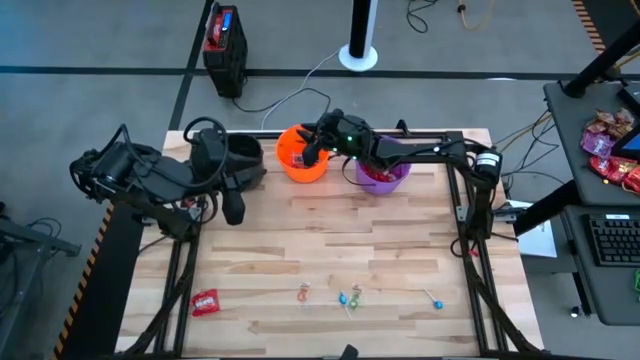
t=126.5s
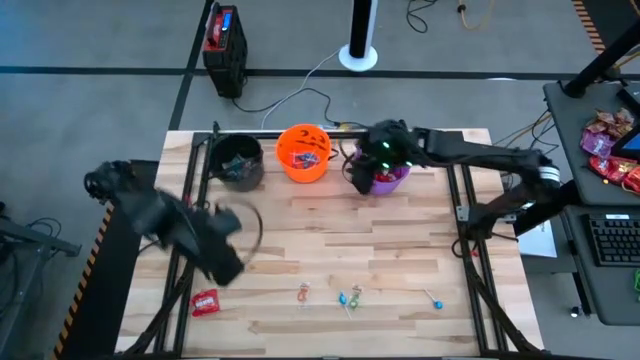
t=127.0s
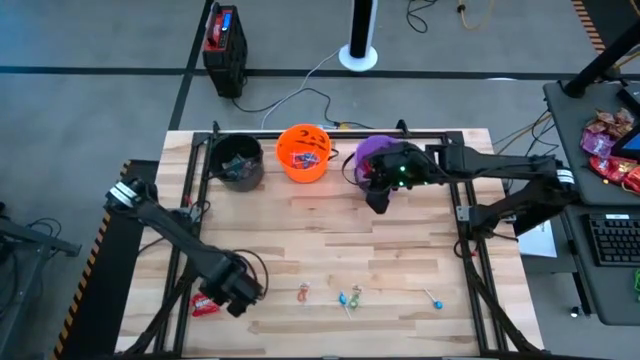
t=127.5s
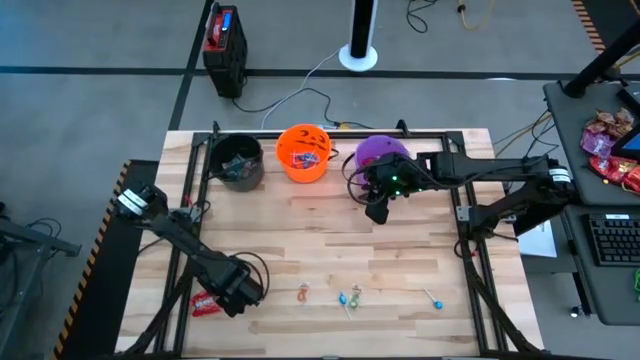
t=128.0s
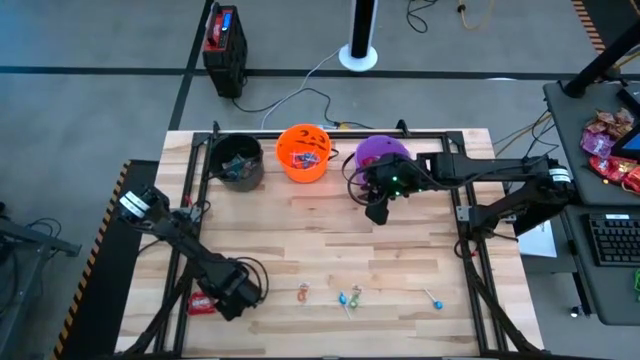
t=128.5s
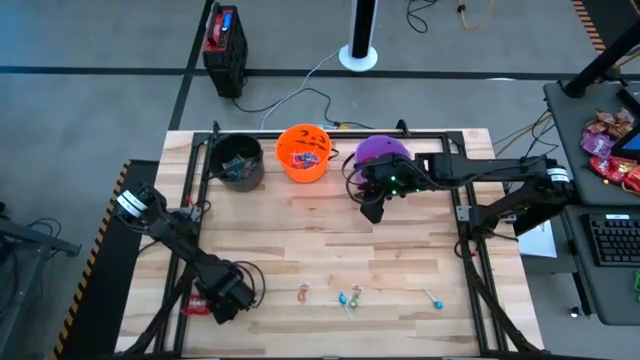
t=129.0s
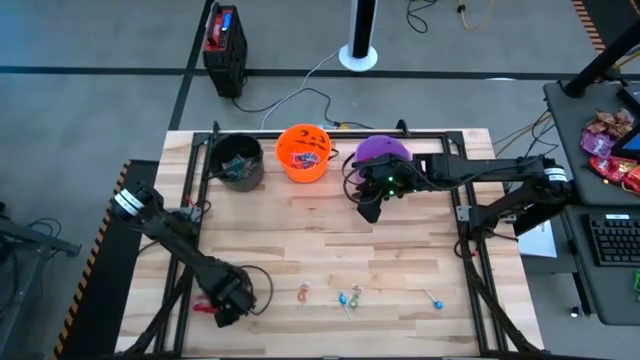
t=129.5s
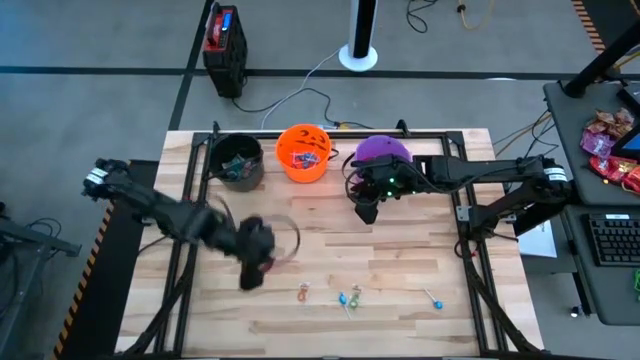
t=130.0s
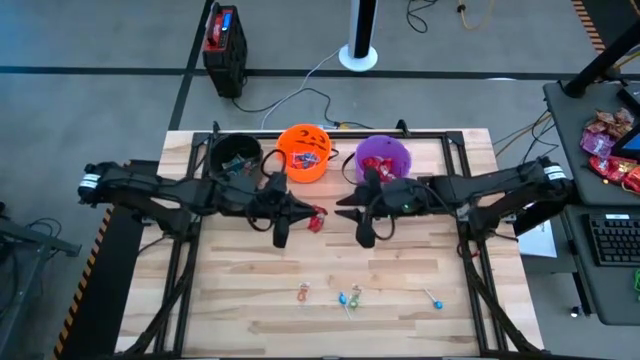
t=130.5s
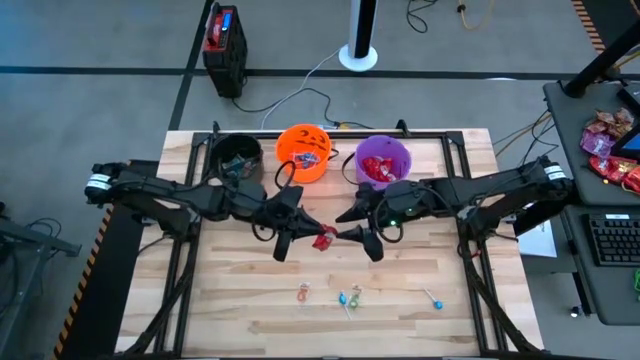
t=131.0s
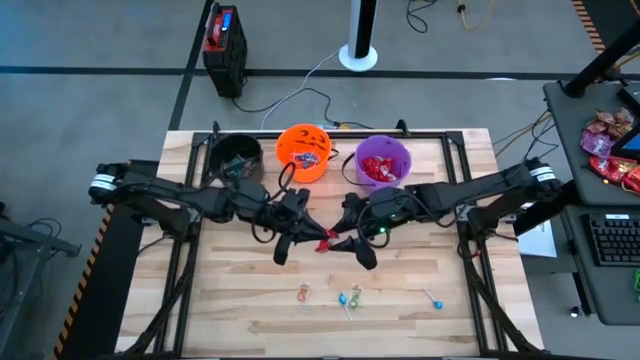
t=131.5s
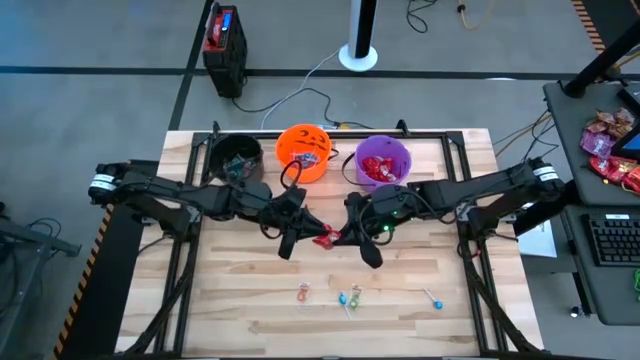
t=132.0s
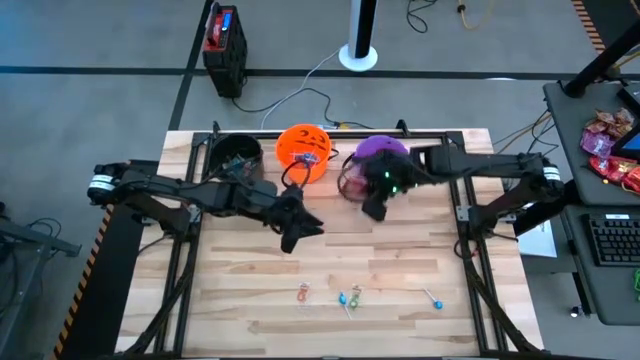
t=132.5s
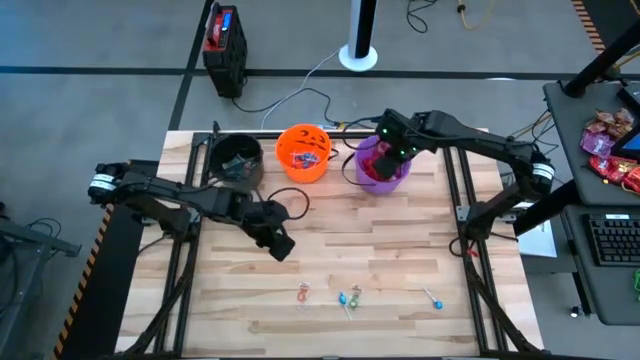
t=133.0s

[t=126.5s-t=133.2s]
Task: Sort candy by brand, put in halloween buckets
Put the red candy into the violet bucket

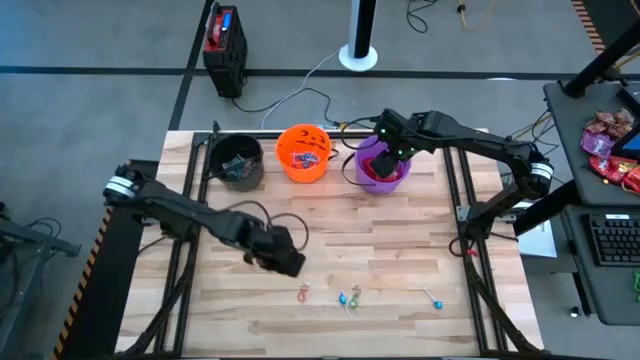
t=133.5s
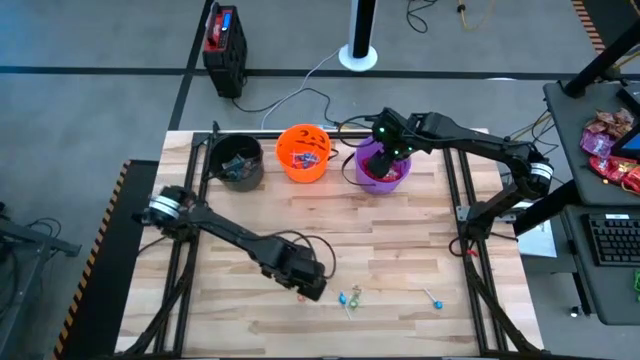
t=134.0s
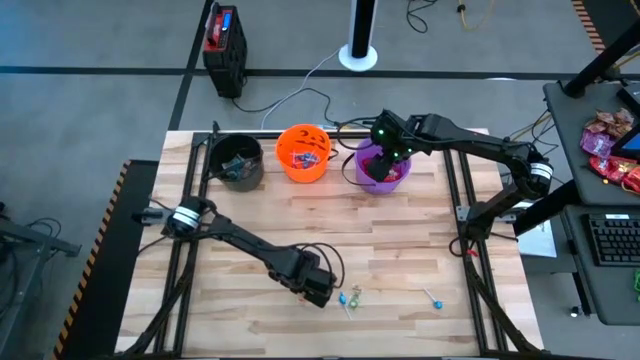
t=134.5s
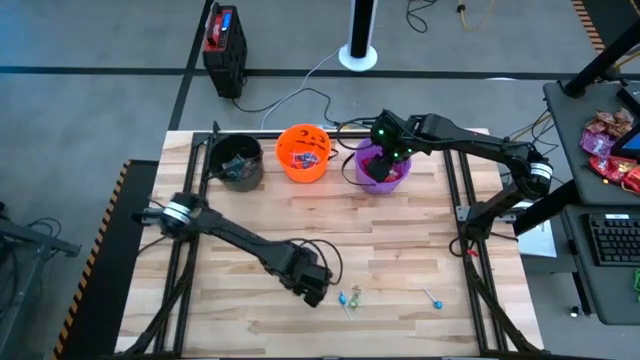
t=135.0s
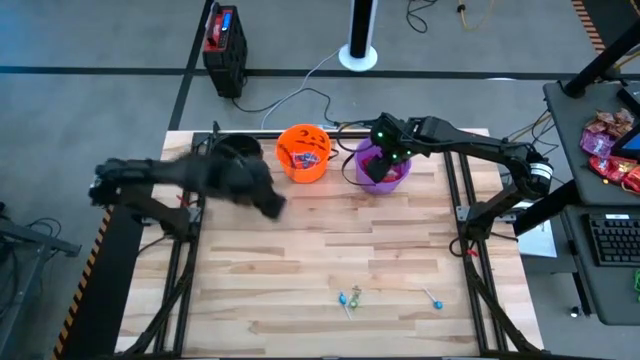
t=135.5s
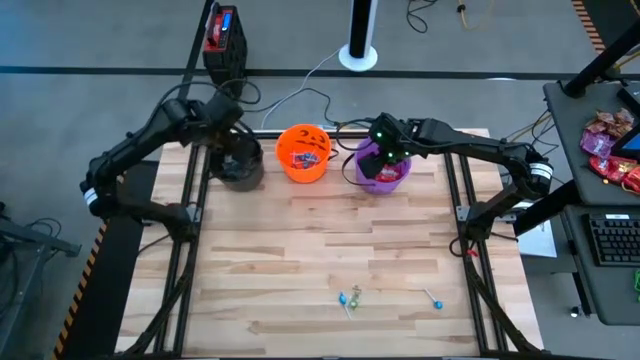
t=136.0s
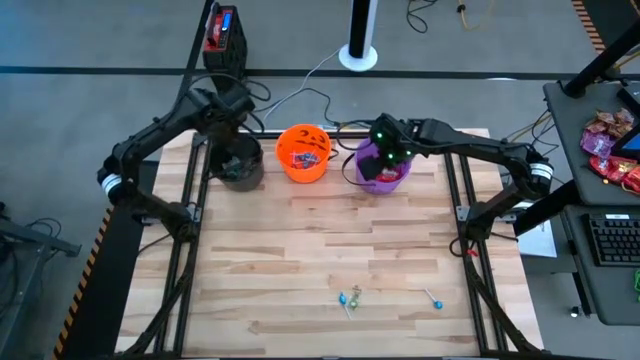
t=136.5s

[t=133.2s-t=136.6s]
Put the orange gummy into the black bucket

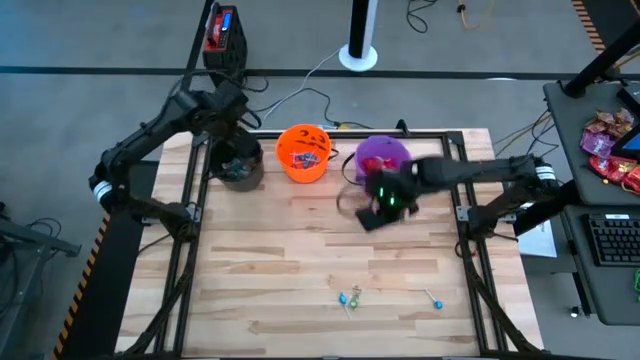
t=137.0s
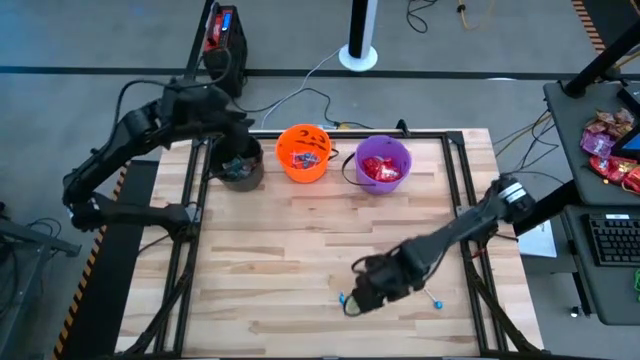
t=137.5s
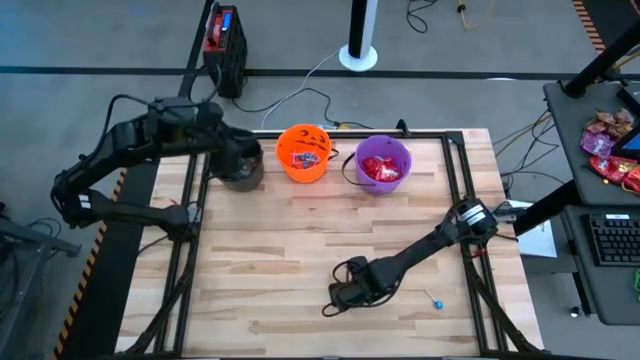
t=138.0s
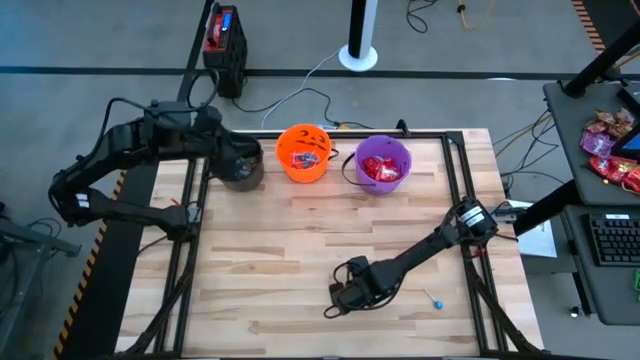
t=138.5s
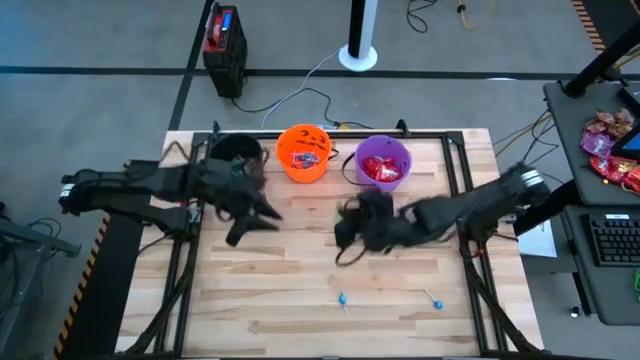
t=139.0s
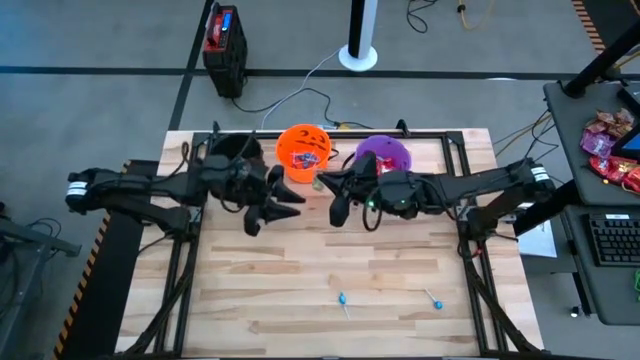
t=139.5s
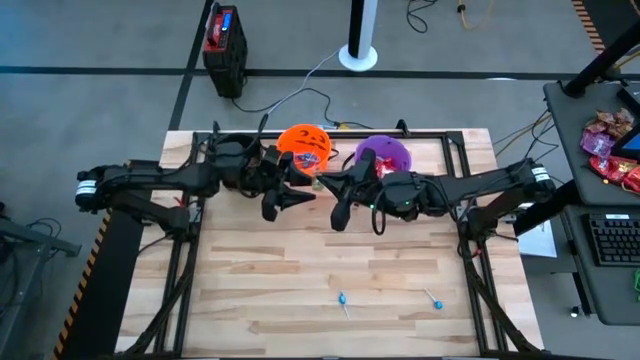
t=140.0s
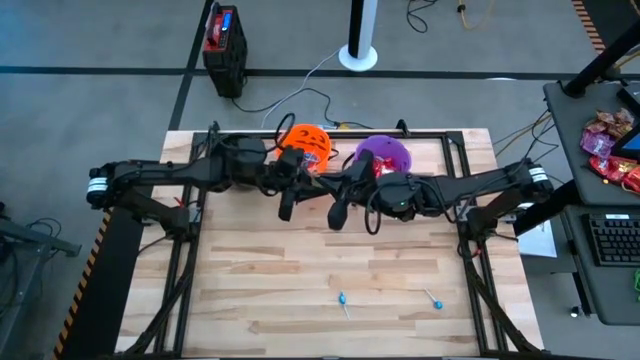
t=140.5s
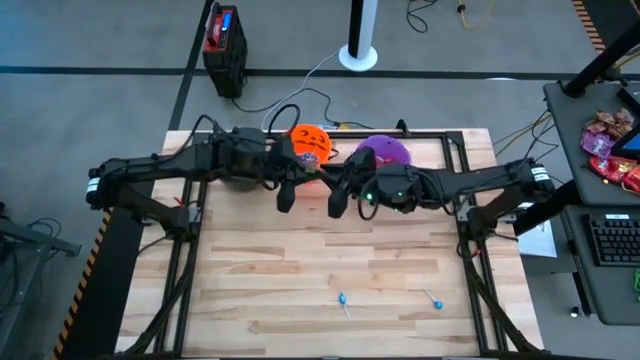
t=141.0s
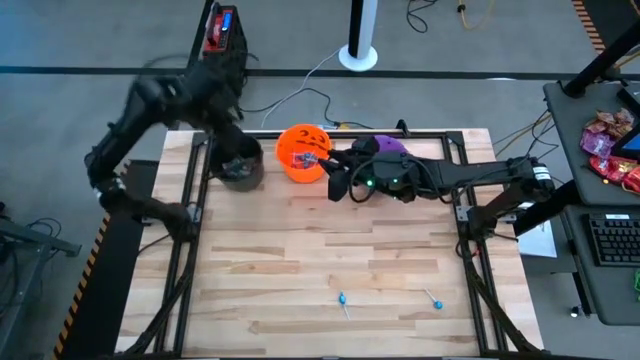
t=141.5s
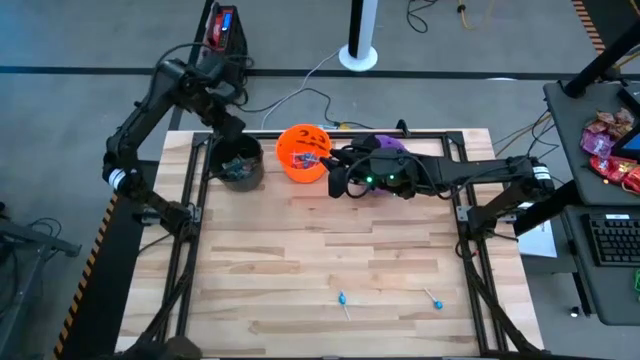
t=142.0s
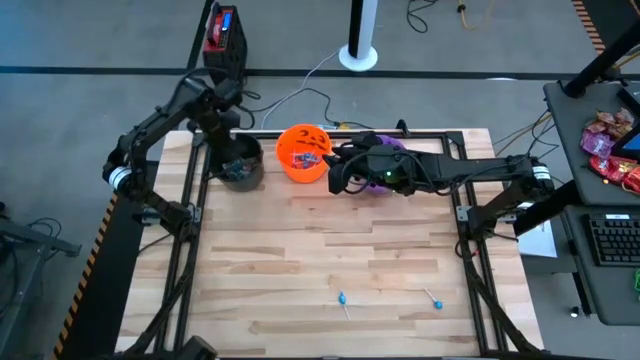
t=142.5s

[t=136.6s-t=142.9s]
Put the green gummy into the black bucket

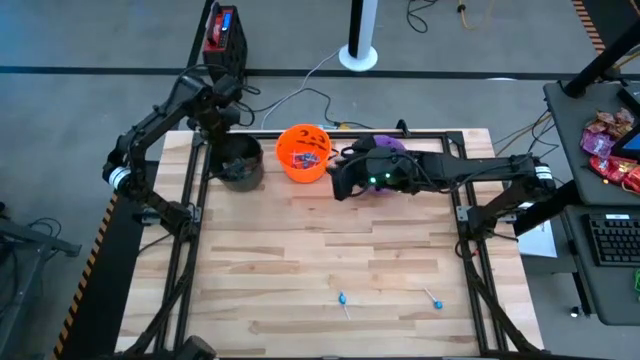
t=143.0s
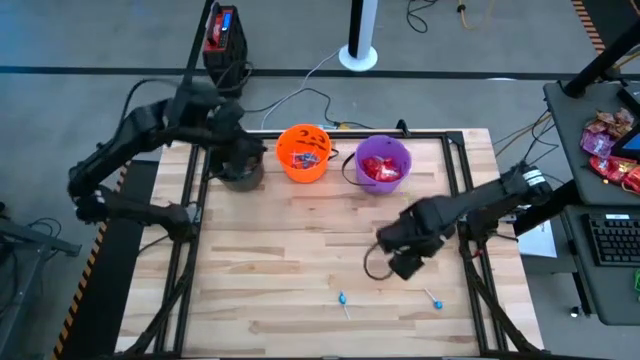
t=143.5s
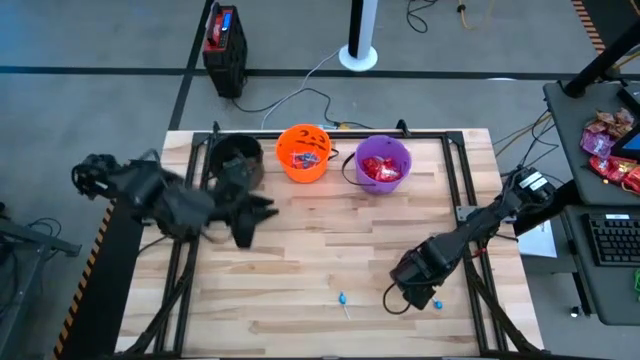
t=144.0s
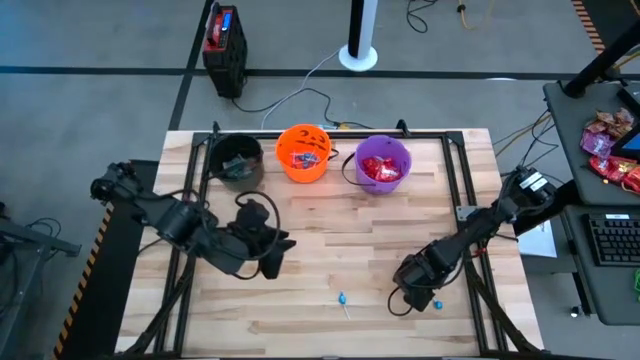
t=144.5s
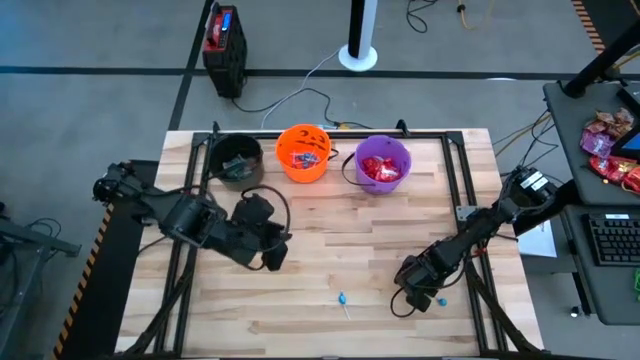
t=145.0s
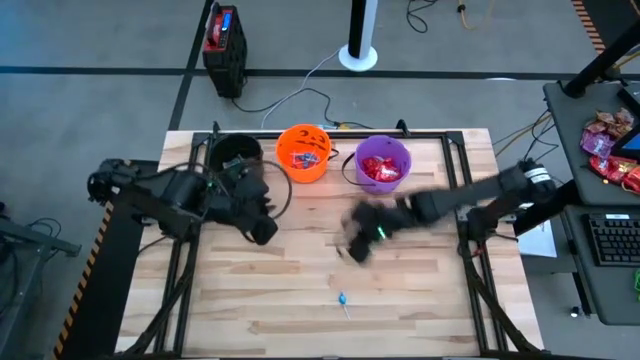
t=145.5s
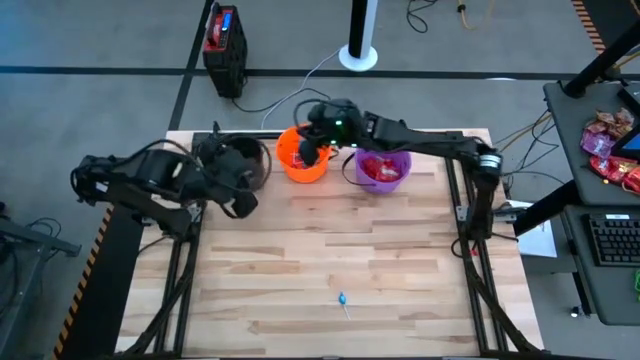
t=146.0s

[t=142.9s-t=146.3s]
Put the blue candy into the orange bucket

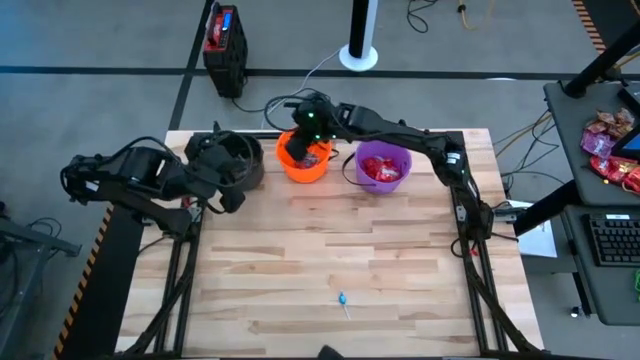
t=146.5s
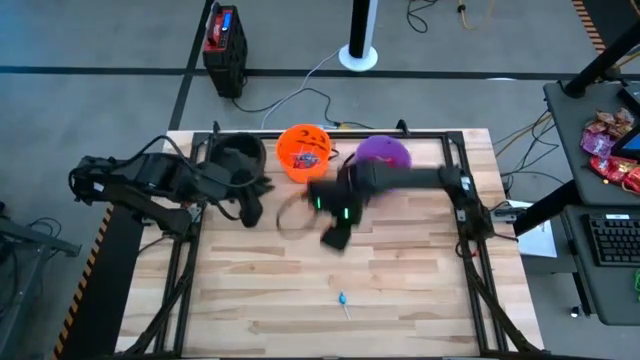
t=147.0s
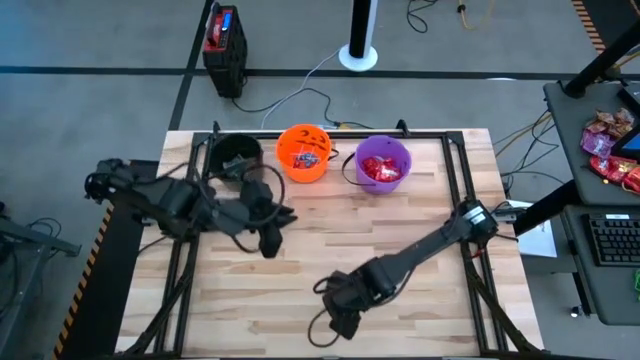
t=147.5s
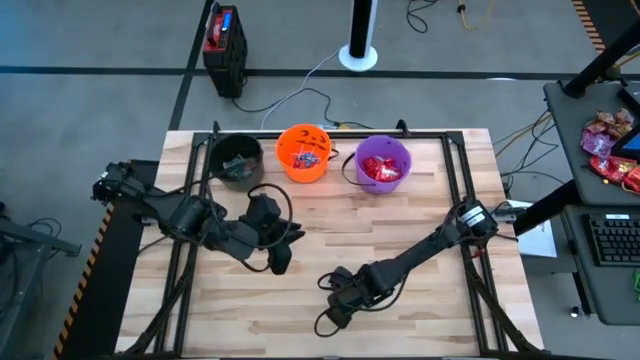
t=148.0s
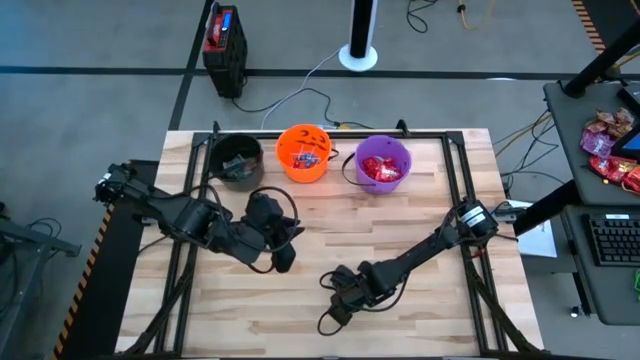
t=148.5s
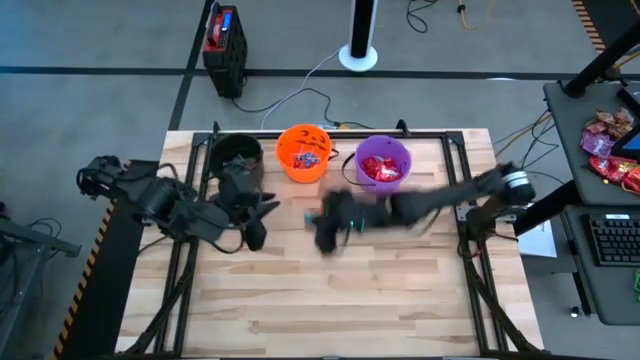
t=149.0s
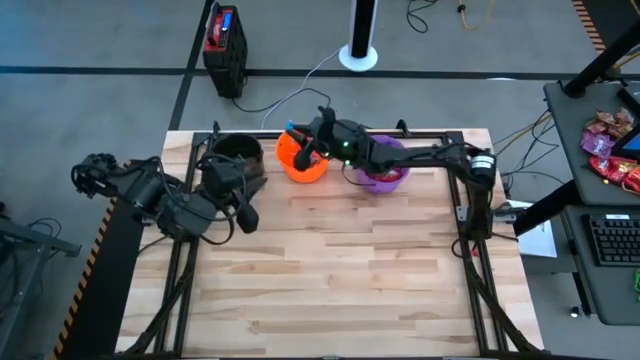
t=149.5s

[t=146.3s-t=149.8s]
Put the blue candy into the orange bucket
